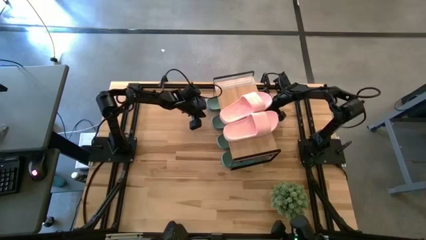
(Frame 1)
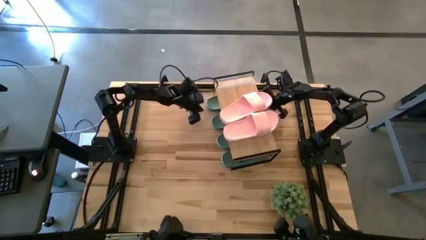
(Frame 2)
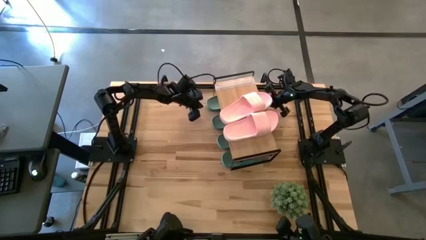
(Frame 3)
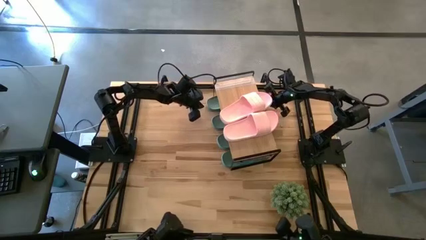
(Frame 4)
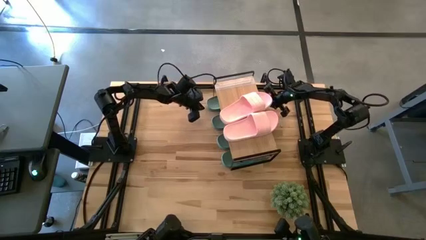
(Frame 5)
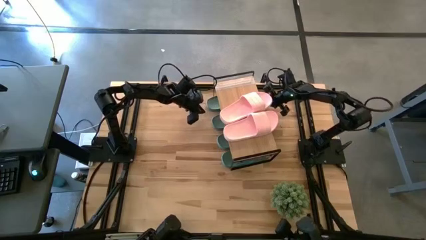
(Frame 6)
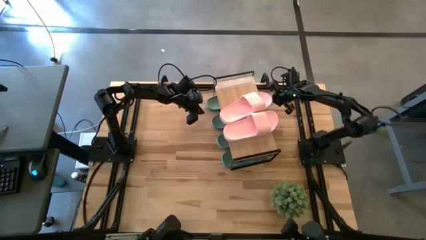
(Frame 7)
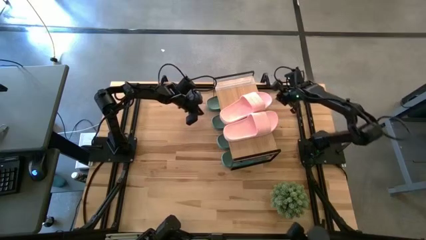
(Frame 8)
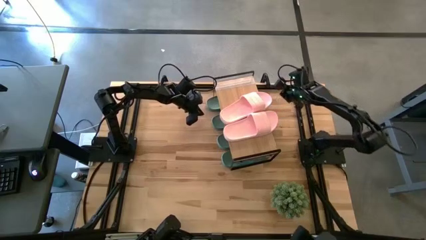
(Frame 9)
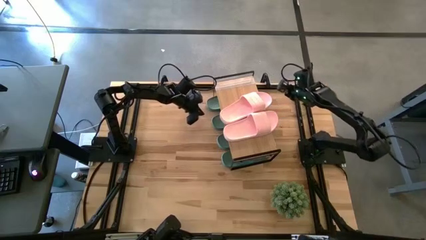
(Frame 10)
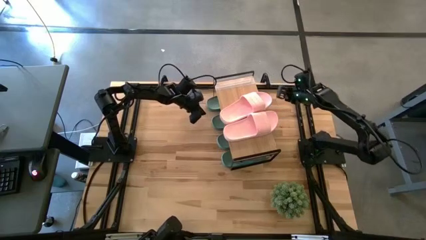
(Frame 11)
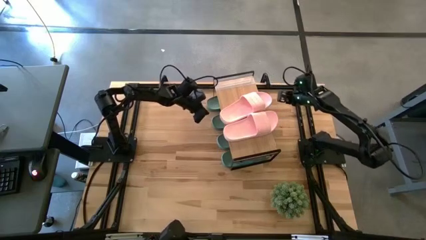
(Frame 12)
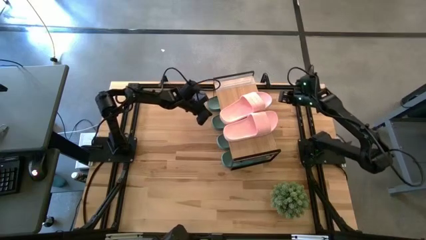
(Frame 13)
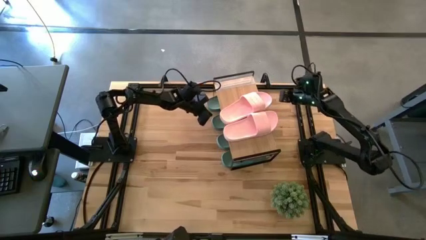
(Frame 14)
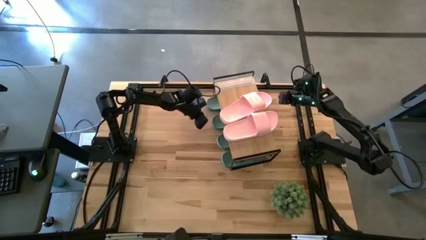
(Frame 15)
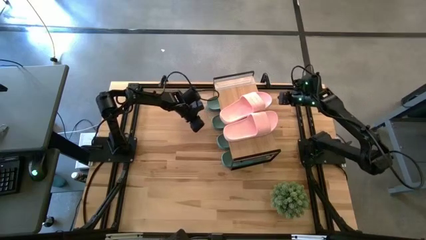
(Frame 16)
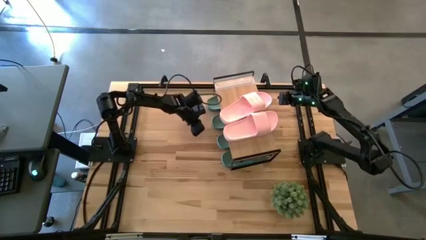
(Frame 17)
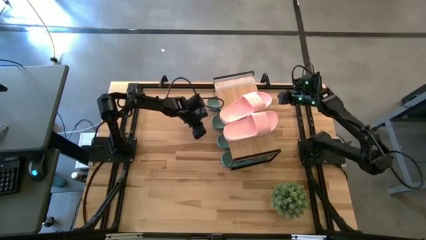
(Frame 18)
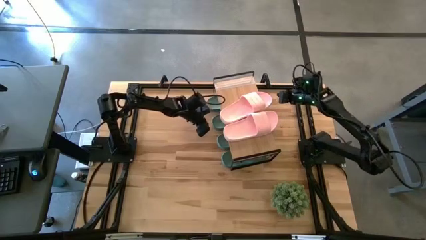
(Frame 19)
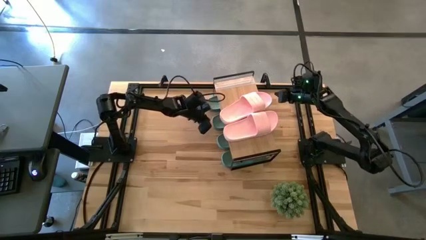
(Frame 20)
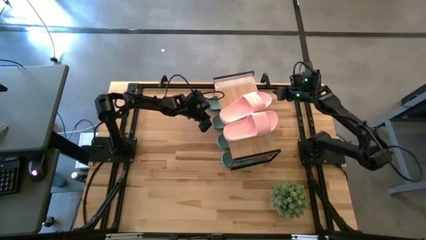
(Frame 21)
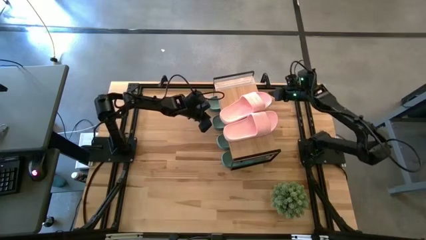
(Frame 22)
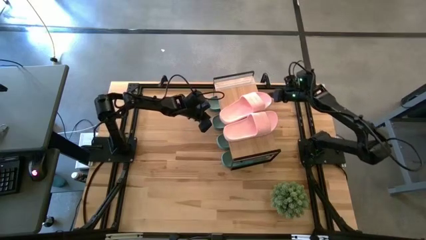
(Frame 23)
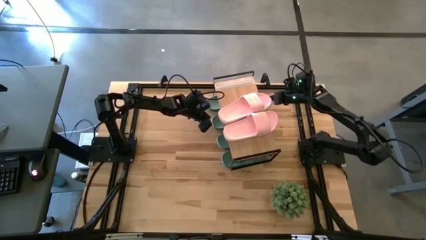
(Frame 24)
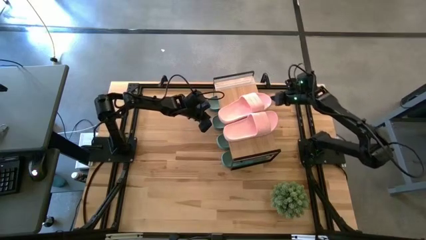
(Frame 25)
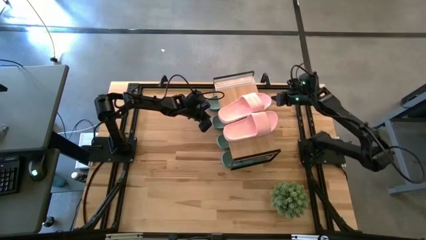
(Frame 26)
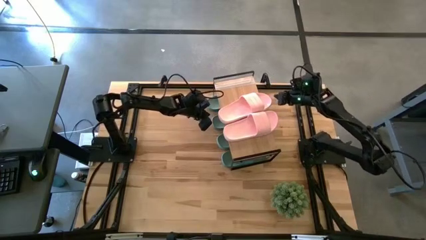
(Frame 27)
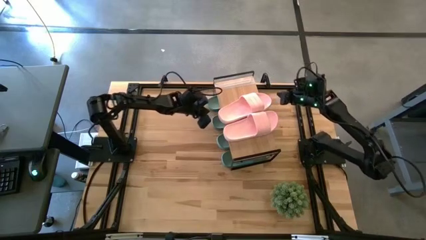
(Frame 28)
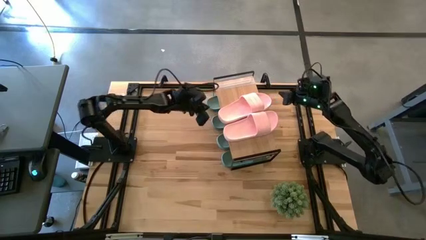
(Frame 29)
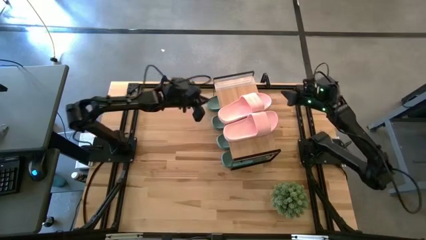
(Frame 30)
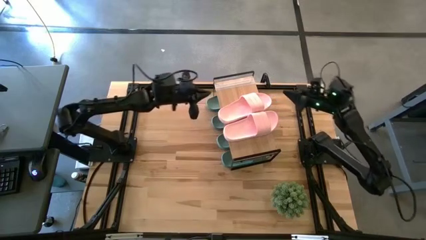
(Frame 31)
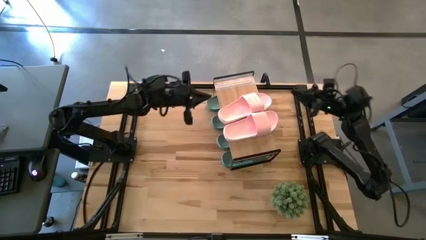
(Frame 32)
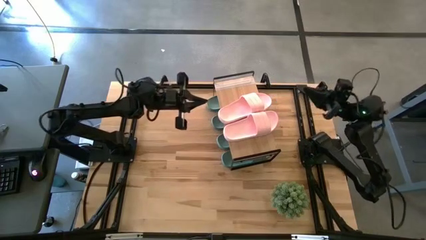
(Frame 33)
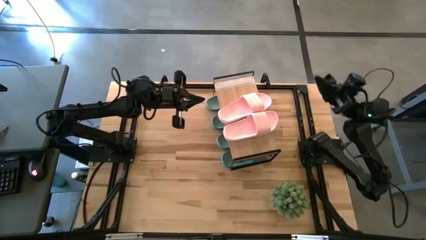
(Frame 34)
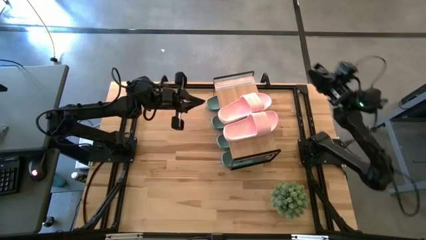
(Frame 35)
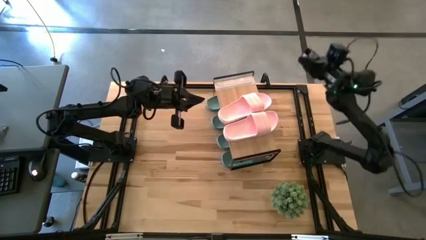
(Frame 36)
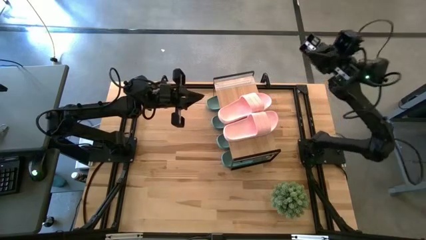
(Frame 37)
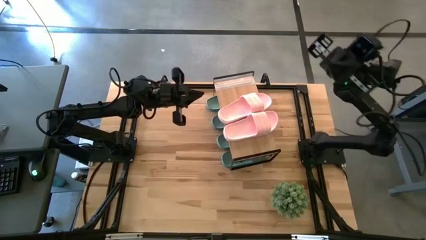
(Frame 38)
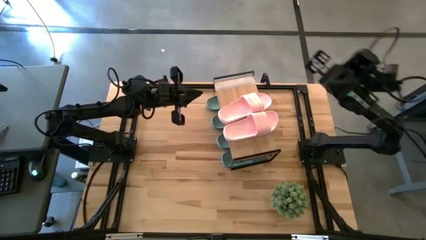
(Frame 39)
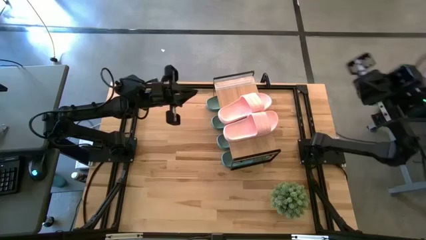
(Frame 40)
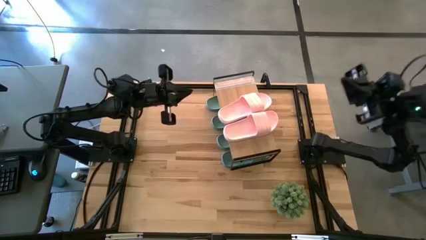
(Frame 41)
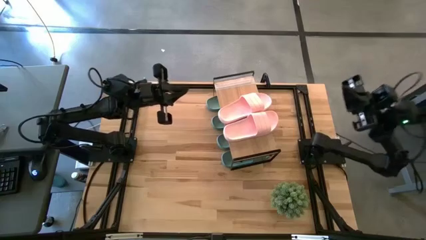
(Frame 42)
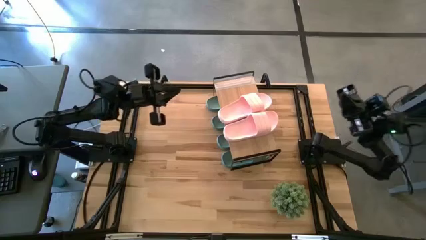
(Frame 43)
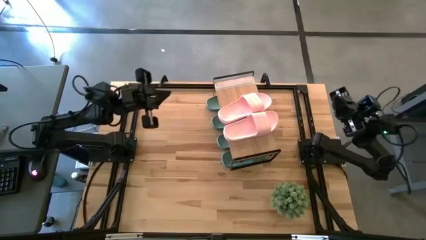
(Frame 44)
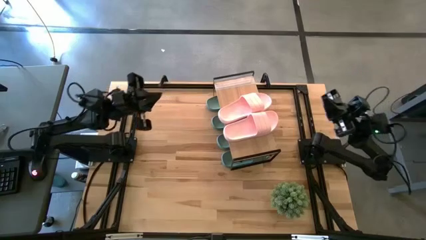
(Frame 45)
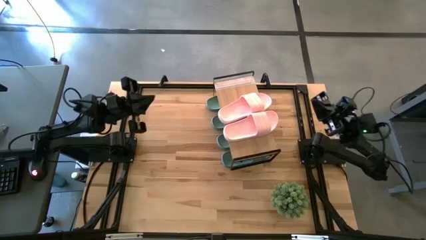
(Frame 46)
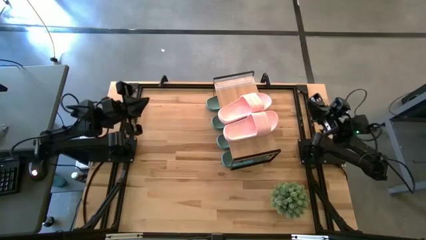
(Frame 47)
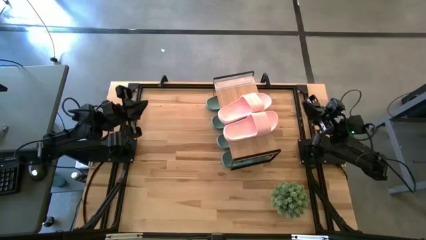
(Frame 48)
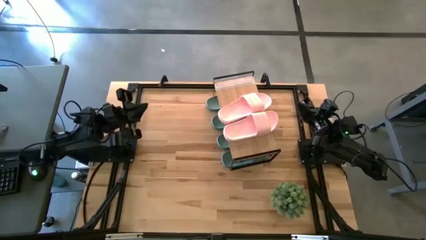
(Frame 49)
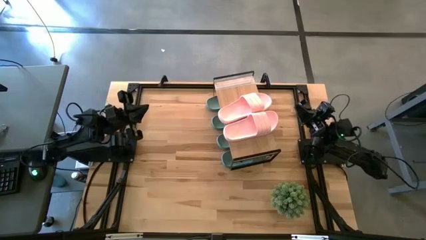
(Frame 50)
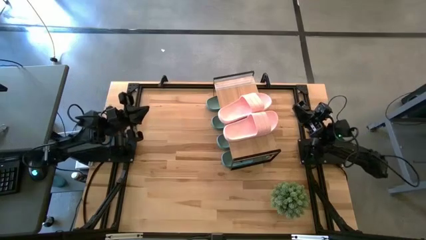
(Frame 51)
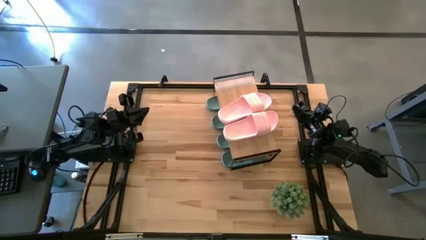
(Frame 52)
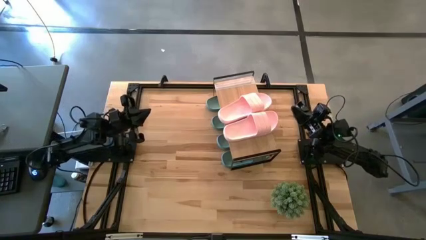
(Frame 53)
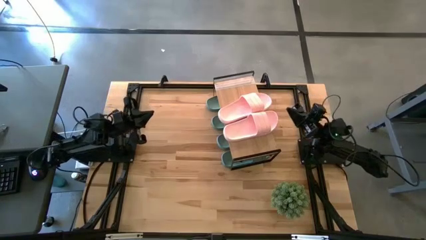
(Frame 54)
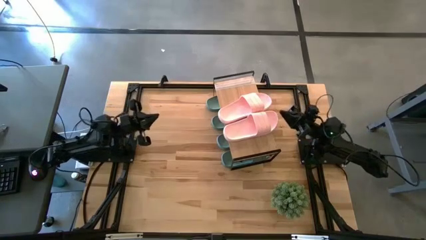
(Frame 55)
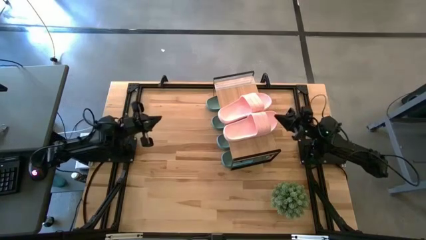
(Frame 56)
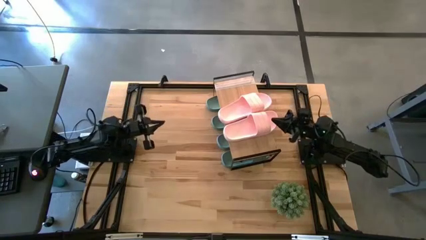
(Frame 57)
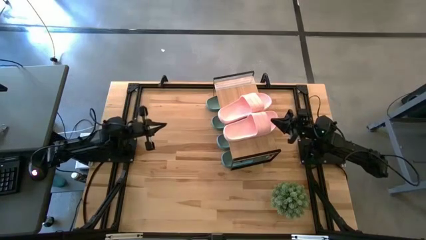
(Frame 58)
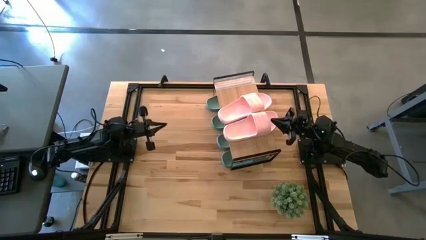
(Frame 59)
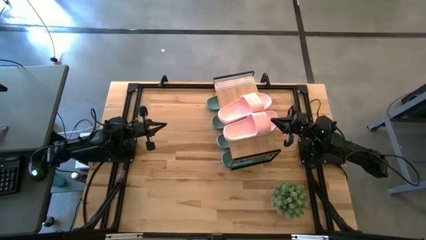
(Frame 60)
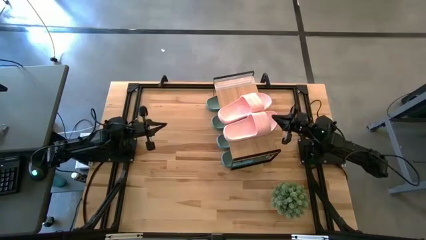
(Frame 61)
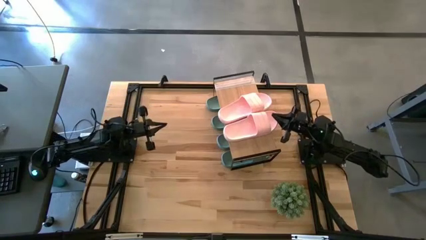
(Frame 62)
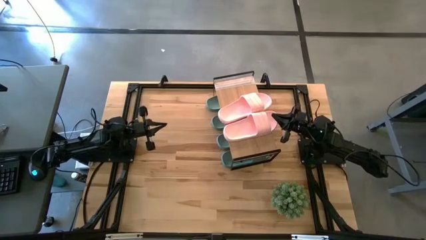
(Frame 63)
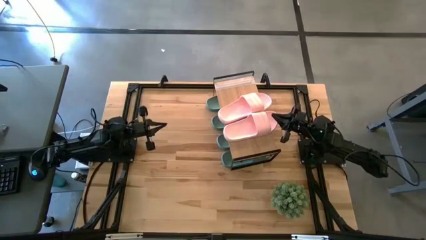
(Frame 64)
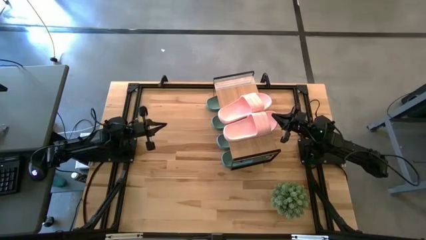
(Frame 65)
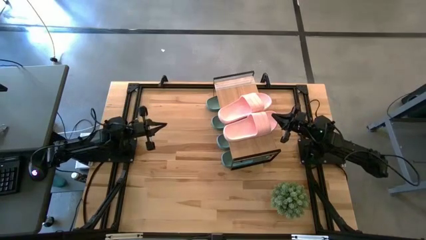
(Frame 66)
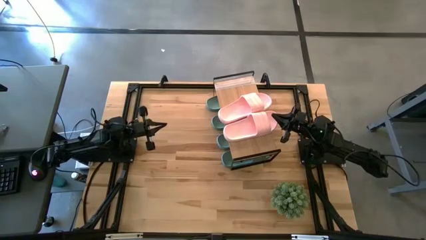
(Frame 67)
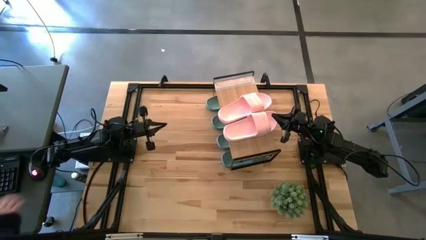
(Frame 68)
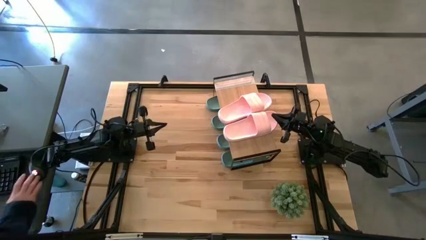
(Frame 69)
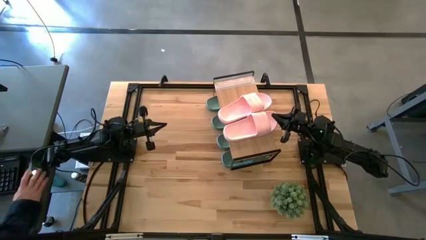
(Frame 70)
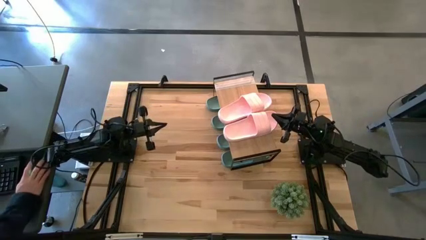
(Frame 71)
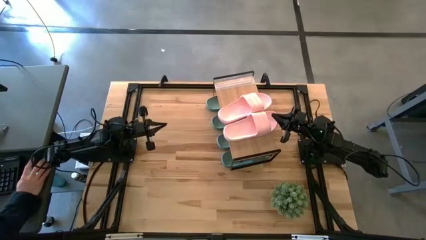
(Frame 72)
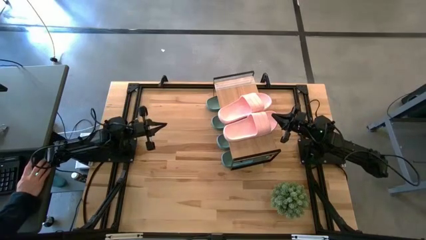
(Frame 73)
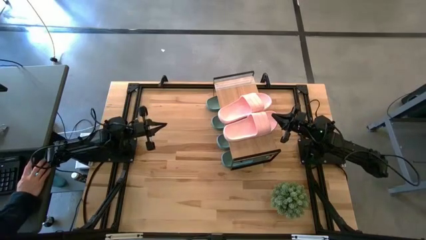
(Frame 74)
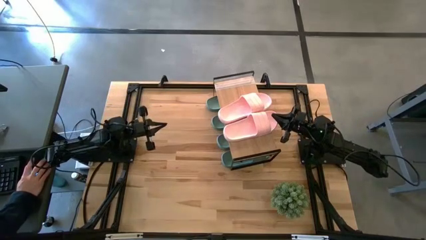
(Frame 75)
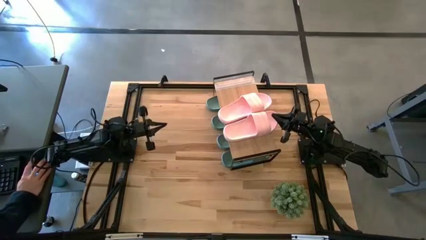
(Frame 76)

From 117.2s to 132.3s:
Task: Pick and place slides into the shelf
Return to Home Position

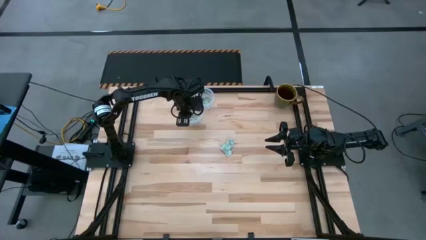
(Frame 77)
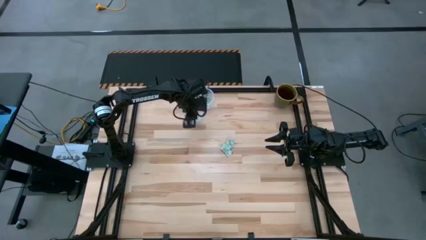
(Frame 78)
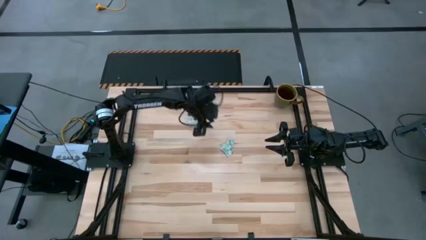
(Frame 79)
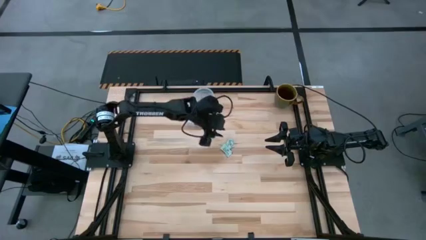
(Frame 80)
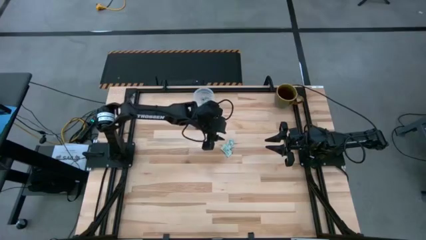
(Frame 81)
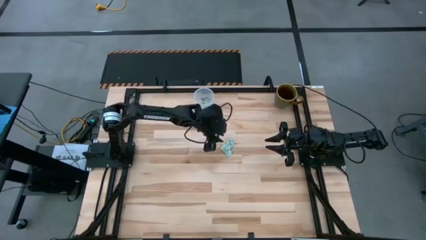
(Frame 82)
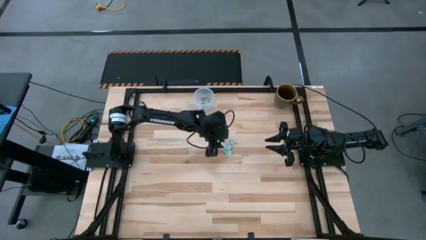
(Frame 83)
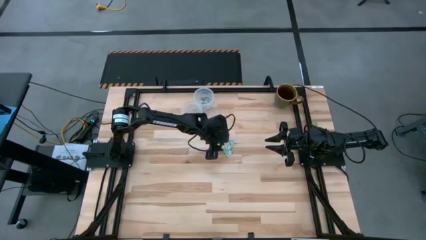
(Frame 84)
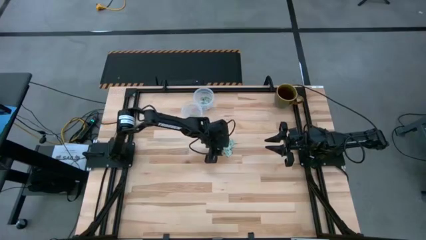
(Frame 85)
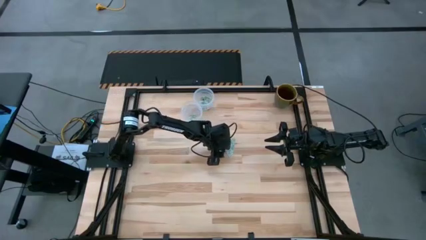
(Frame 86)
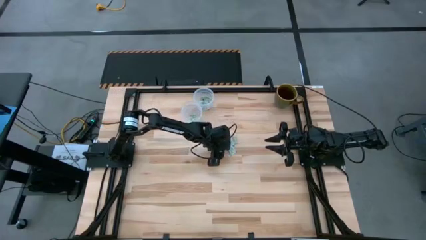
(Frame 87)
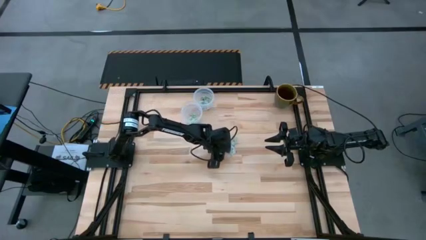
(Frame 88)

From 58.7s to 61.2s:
Task: Pick and place items into bin
Put the bottom stevia packet into the bottom bin
